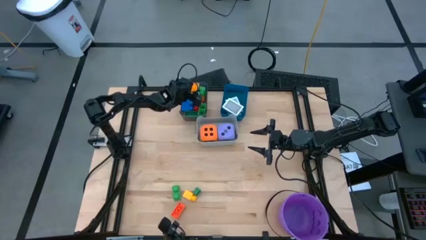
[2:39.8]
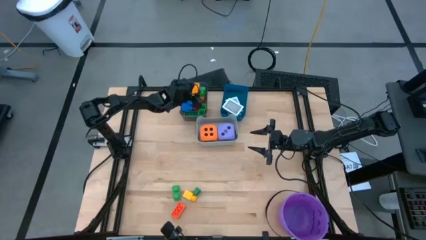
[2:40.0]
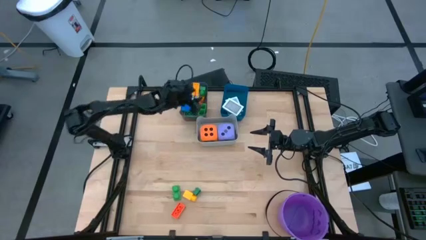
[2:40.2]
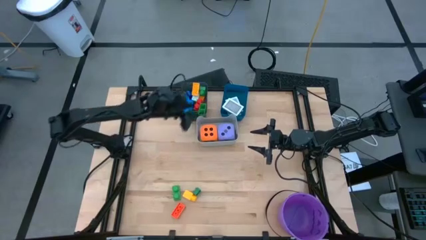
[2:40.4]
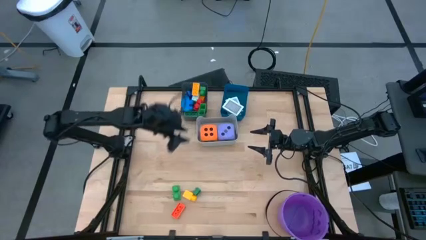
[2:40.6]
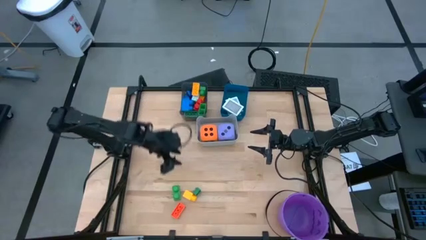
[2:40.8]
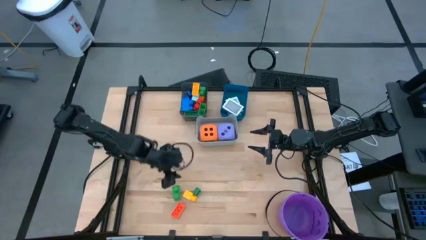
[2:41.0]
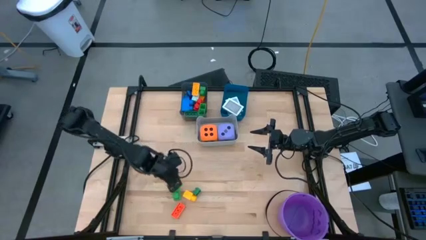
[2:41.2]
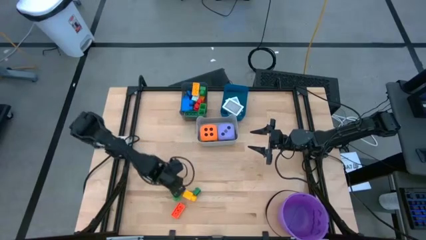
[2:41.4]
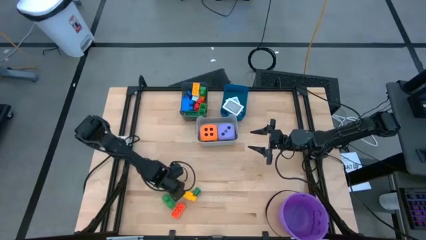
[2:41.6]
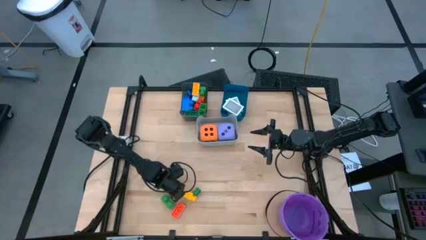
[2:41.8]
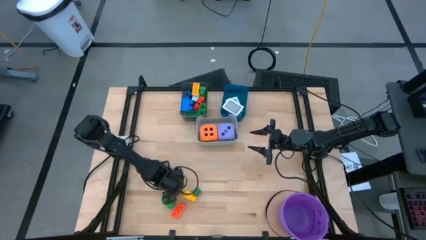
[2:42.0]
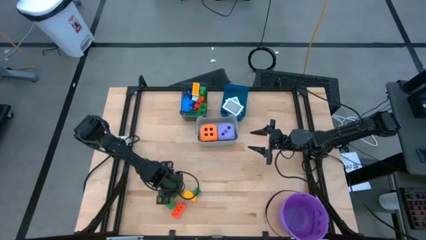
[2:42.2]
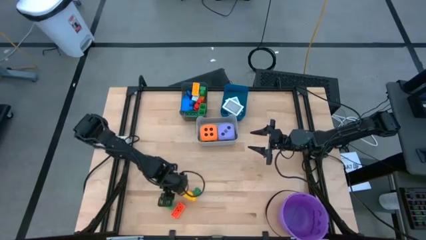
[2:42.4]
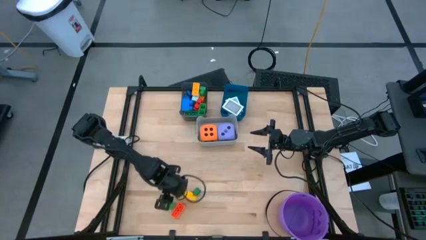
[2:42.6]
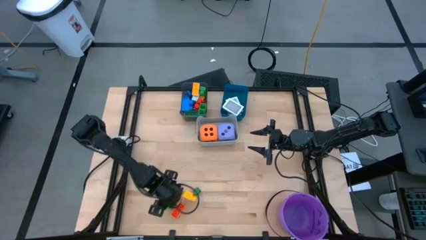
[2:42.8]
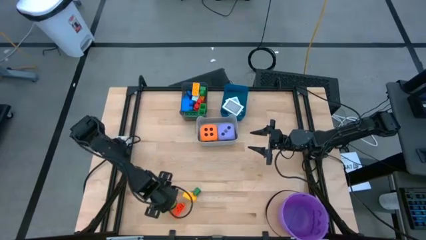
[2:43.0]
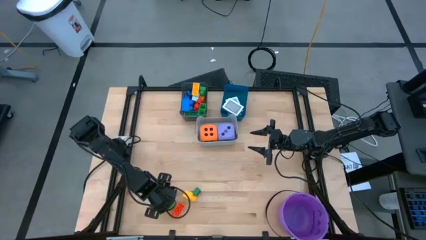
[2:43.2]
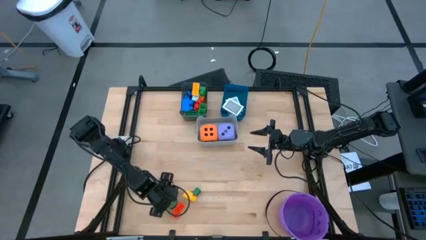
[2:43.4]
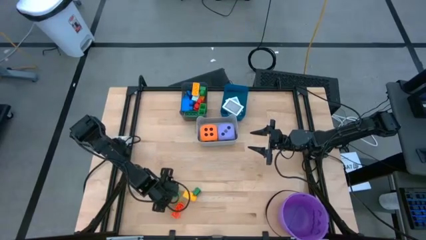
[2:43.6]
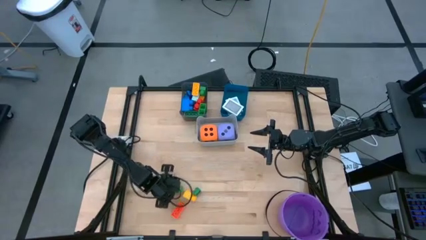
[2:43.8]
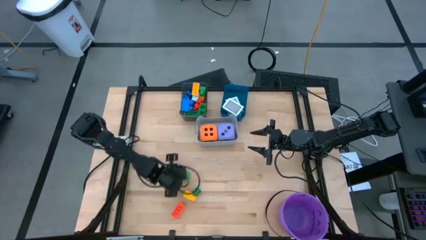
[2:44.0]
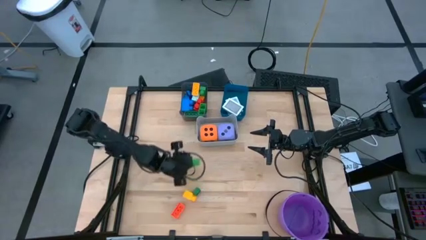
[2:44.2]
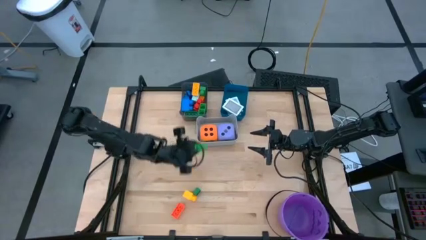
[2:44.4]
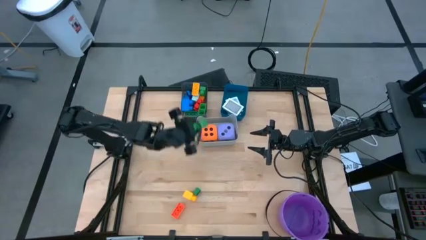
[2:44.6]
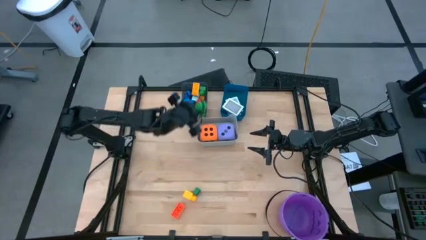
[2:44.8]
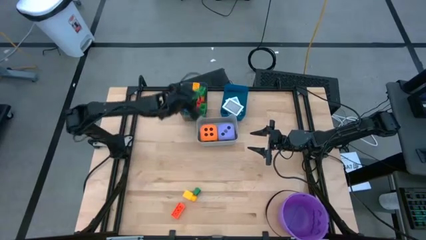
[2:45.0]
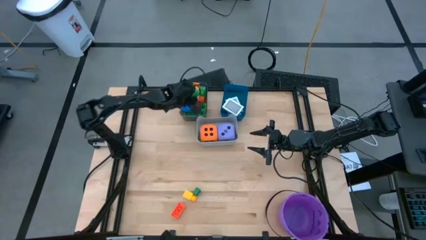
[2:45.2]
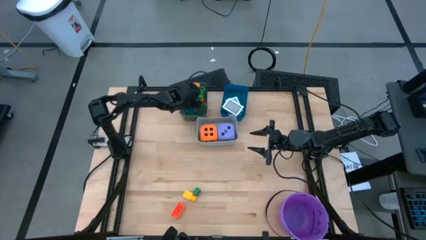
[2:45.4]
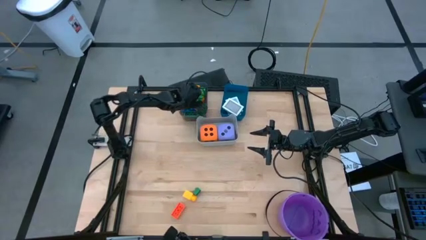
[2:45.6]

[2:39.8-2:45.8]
Task: Pick & Place Toys
Put the green game piece into the black bin

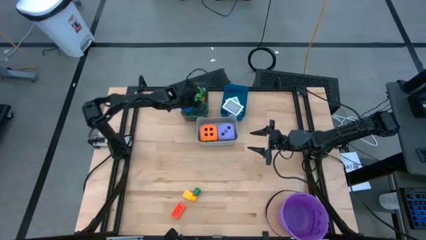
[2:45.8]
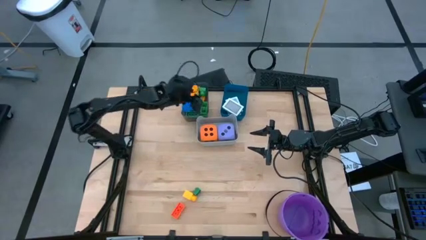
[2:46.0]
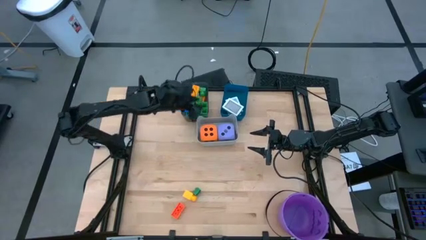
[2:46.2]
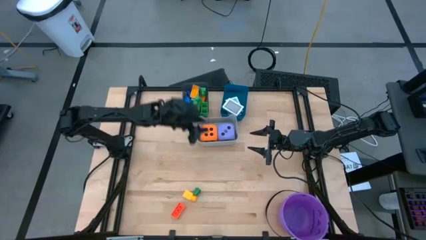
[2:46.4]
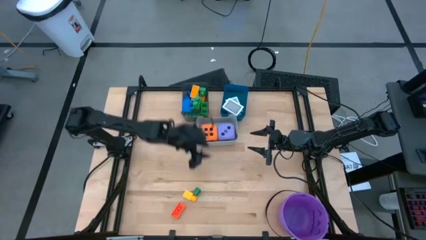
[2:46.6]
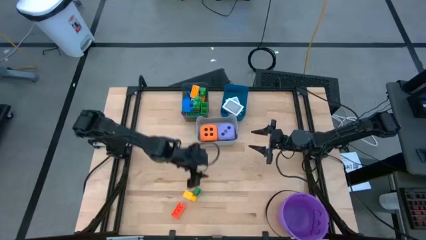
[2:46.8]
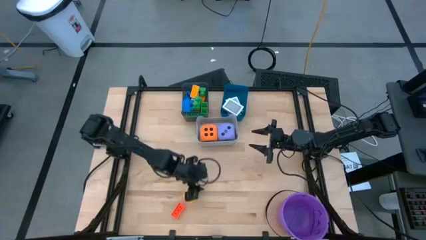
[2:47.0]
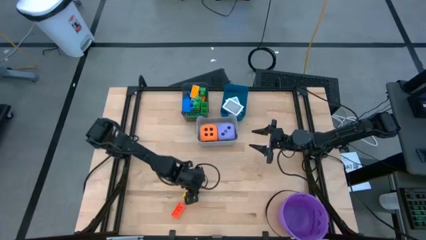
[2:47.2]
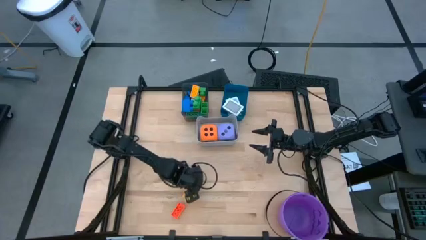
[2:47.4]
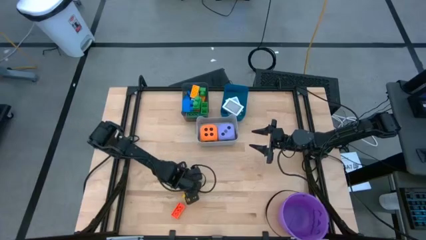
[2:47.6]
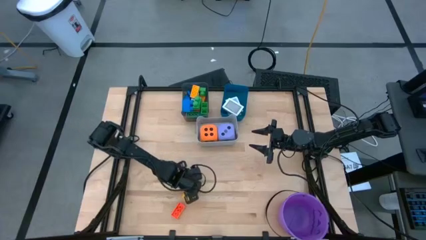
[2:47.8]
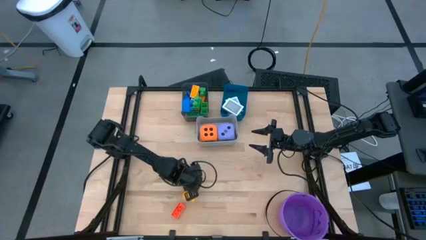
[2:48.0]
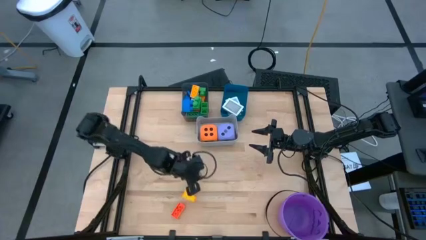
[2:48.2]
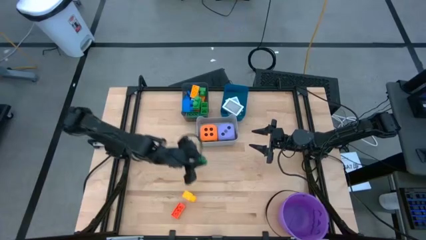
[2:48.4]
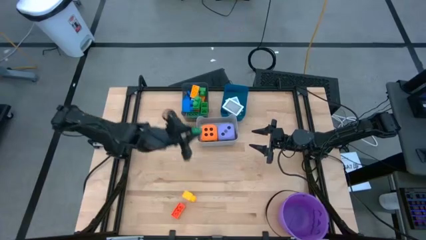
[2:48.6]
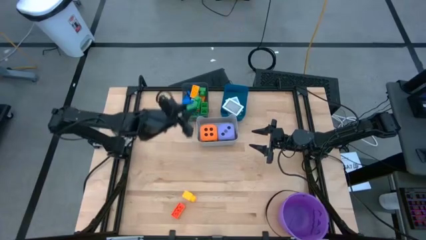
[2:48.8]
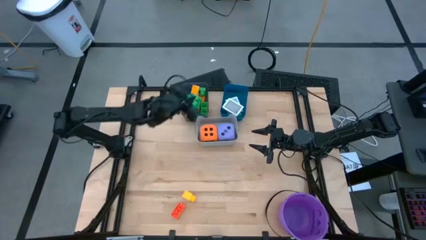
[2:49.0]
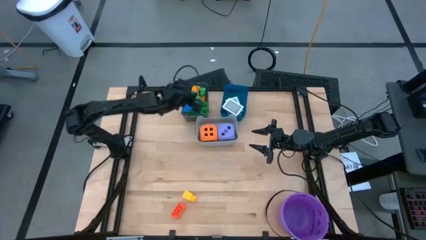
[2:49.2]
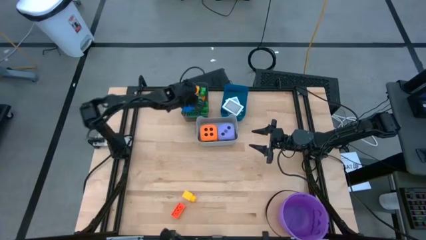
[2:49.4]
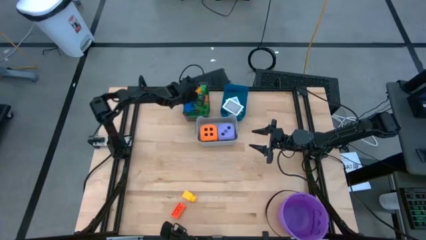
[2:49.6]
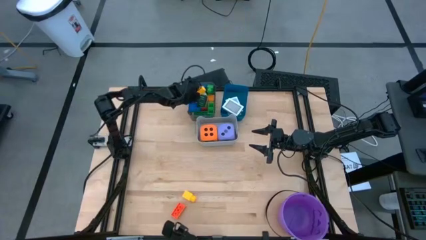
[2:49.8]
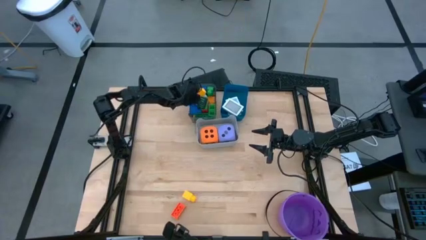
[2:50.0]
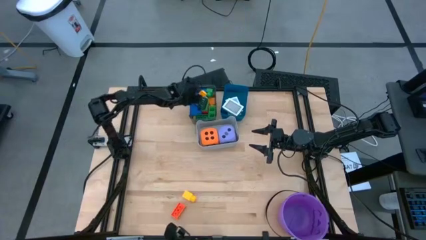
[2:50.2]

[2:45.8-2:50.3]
Put the dark green game piece into the black bin
